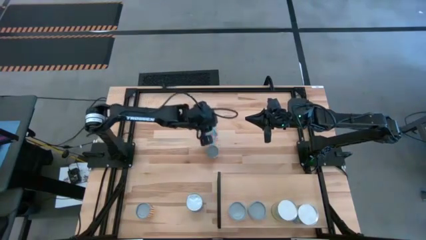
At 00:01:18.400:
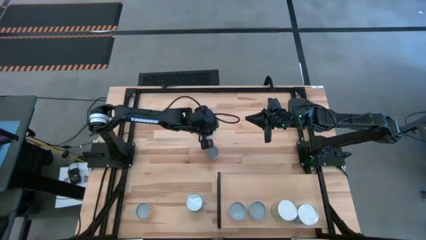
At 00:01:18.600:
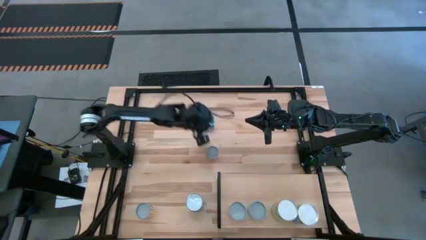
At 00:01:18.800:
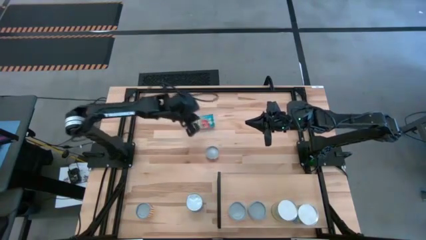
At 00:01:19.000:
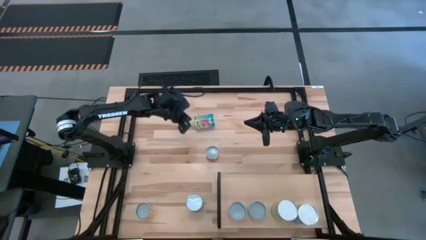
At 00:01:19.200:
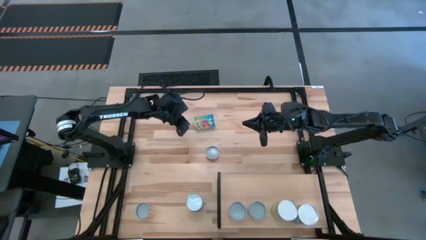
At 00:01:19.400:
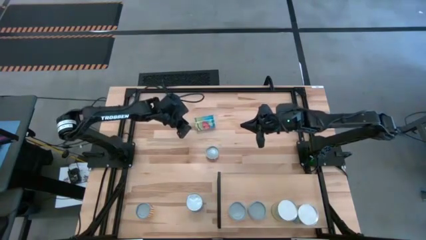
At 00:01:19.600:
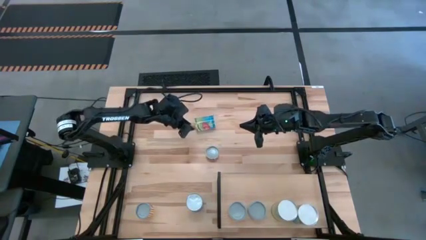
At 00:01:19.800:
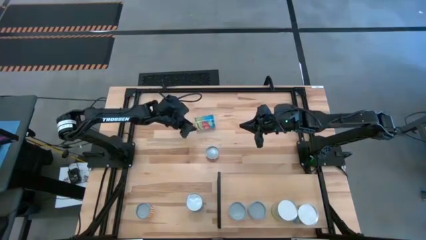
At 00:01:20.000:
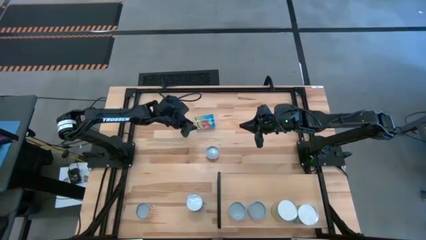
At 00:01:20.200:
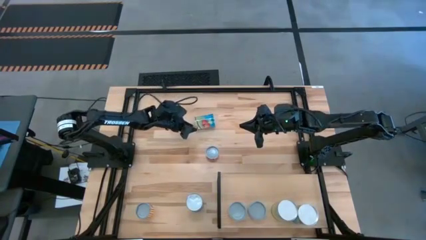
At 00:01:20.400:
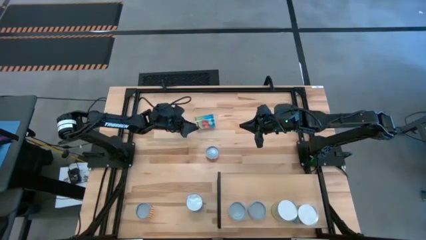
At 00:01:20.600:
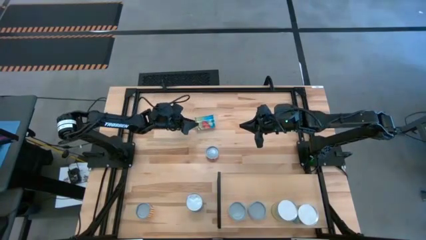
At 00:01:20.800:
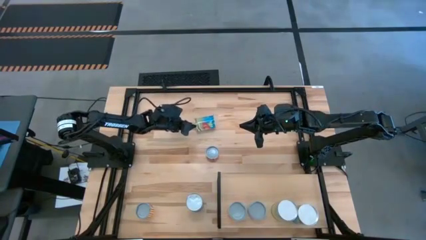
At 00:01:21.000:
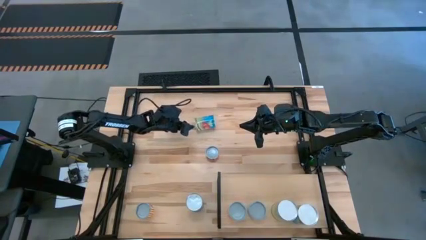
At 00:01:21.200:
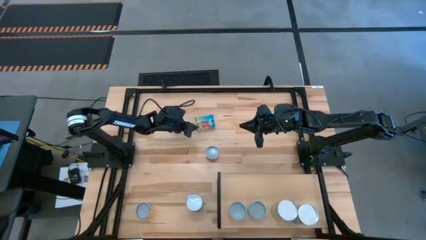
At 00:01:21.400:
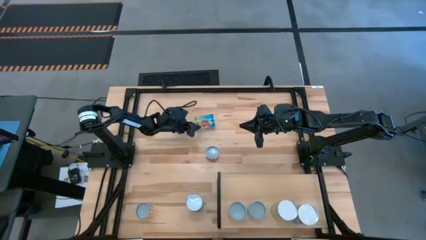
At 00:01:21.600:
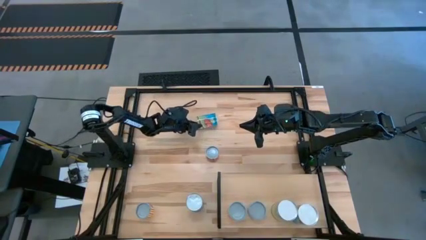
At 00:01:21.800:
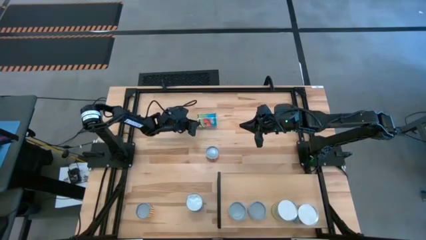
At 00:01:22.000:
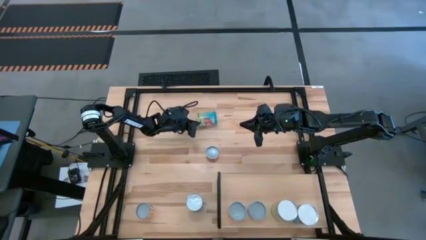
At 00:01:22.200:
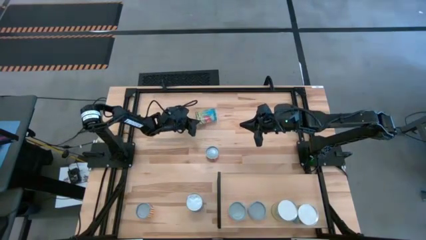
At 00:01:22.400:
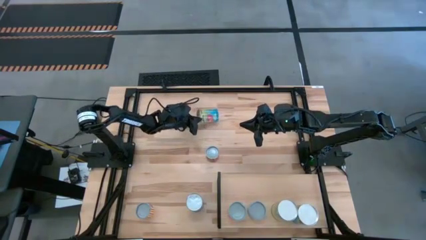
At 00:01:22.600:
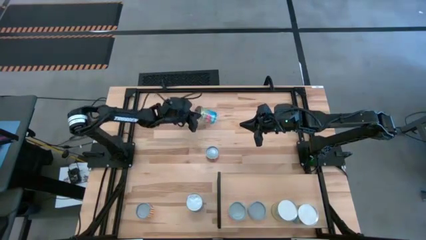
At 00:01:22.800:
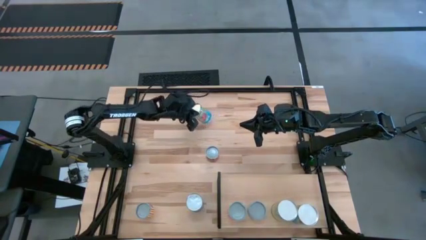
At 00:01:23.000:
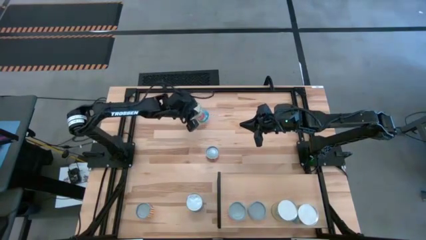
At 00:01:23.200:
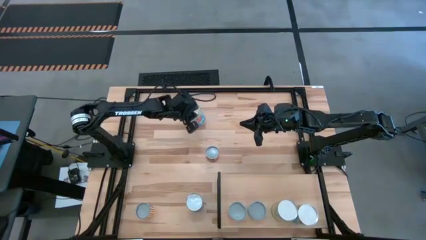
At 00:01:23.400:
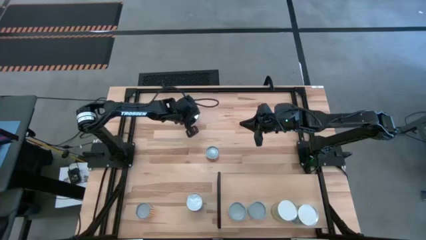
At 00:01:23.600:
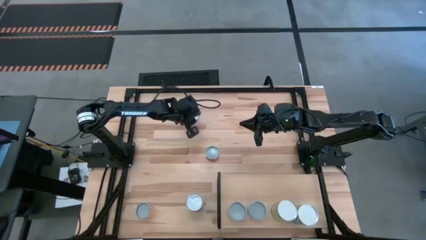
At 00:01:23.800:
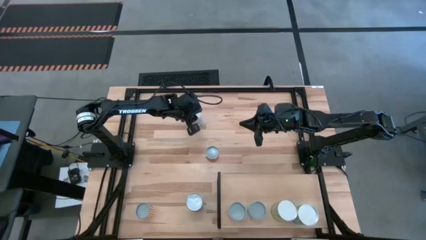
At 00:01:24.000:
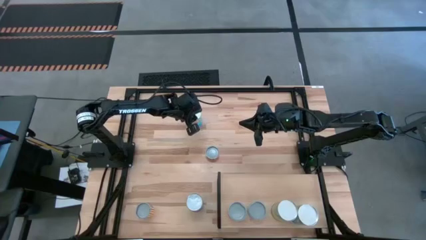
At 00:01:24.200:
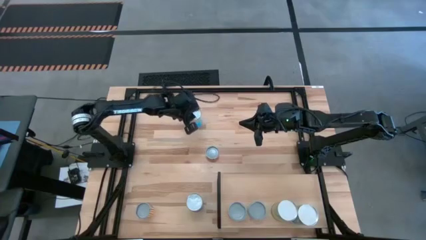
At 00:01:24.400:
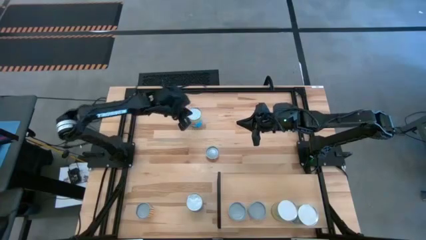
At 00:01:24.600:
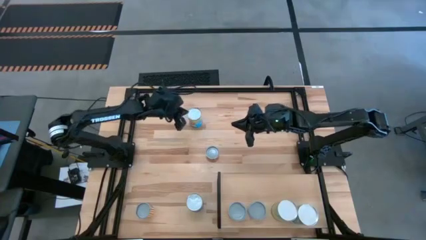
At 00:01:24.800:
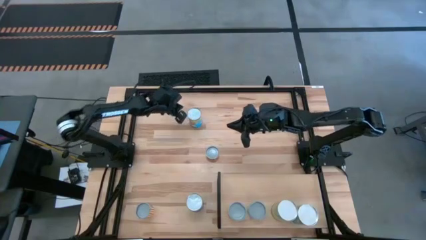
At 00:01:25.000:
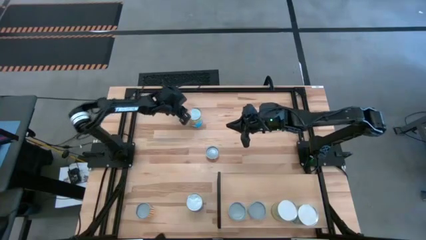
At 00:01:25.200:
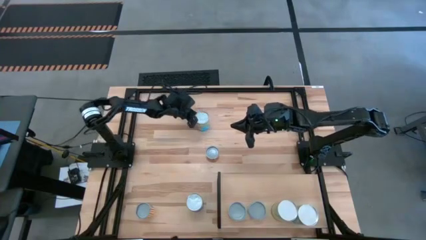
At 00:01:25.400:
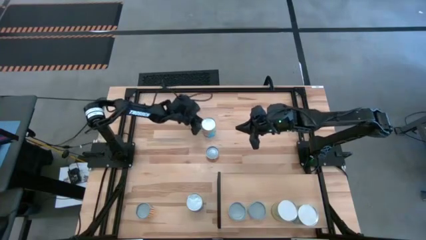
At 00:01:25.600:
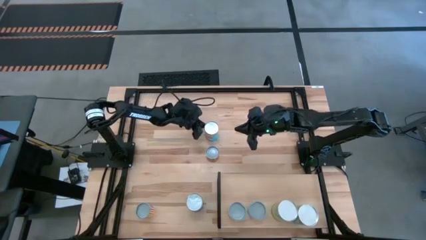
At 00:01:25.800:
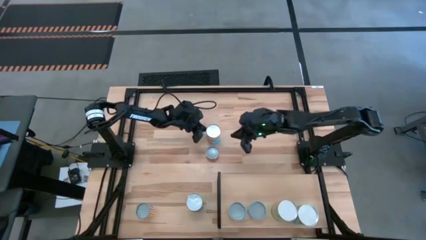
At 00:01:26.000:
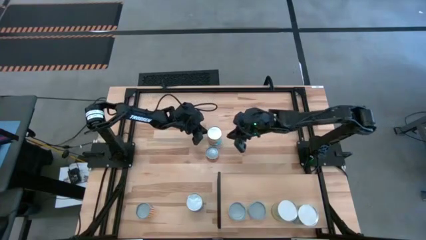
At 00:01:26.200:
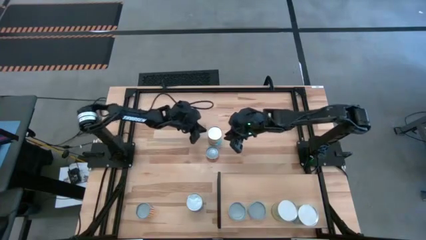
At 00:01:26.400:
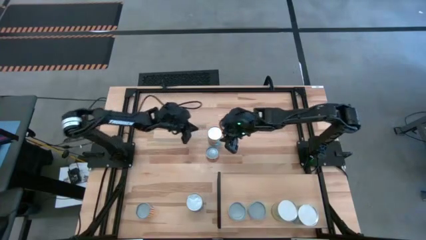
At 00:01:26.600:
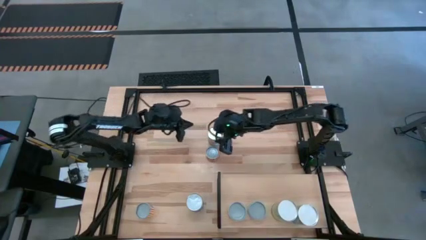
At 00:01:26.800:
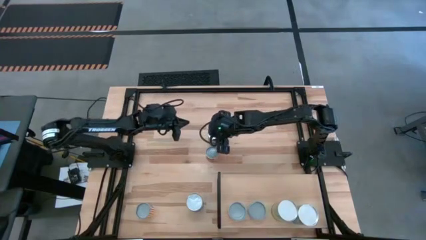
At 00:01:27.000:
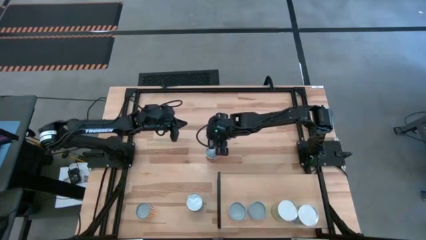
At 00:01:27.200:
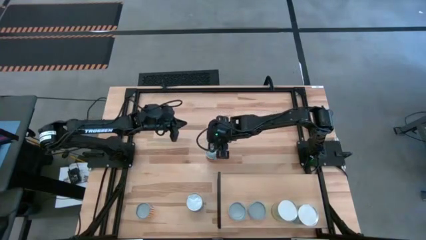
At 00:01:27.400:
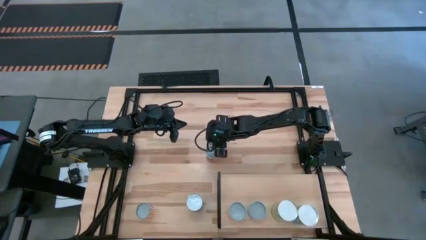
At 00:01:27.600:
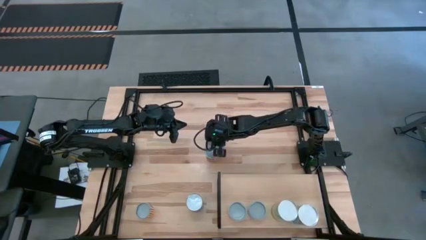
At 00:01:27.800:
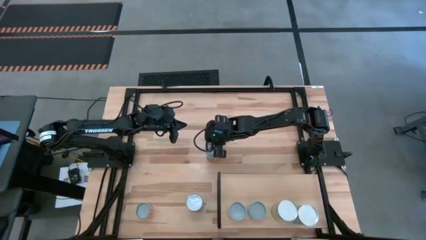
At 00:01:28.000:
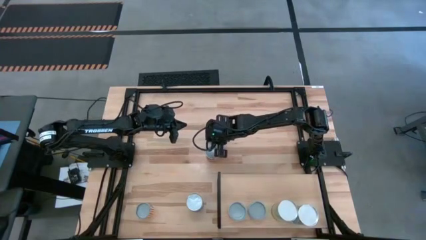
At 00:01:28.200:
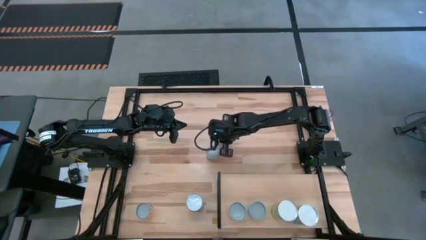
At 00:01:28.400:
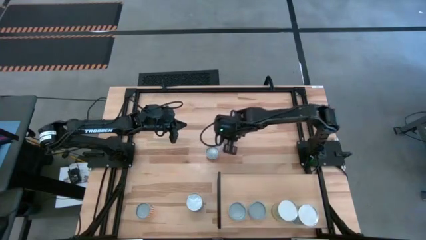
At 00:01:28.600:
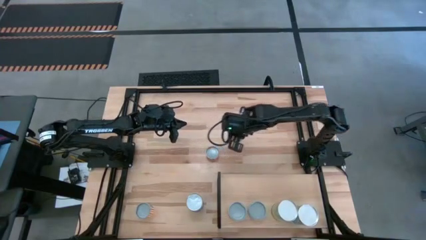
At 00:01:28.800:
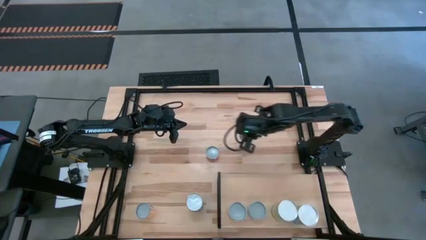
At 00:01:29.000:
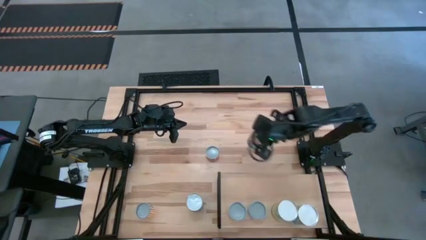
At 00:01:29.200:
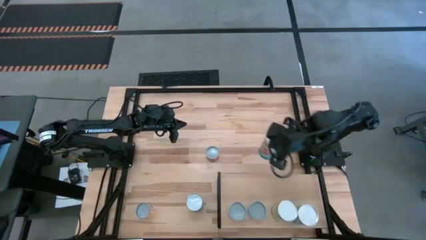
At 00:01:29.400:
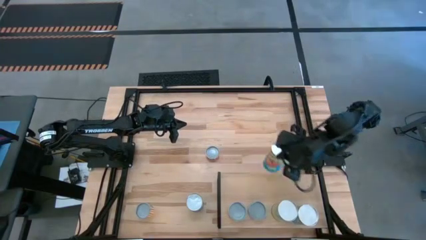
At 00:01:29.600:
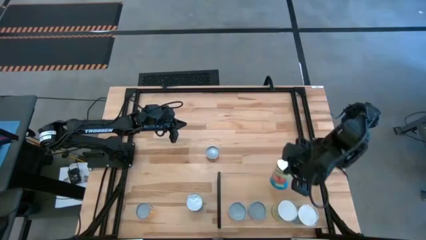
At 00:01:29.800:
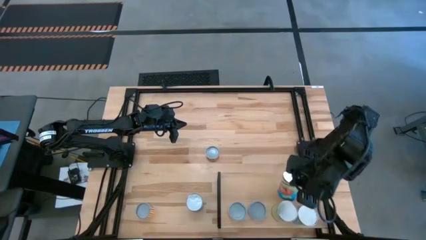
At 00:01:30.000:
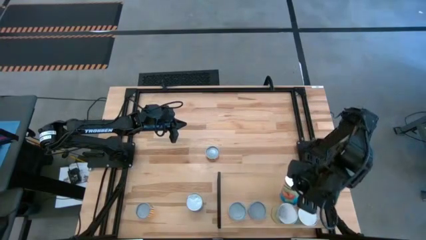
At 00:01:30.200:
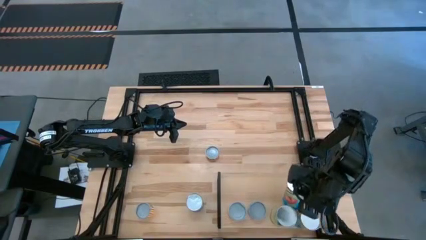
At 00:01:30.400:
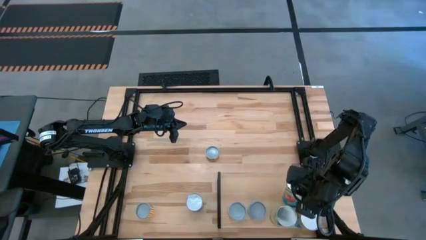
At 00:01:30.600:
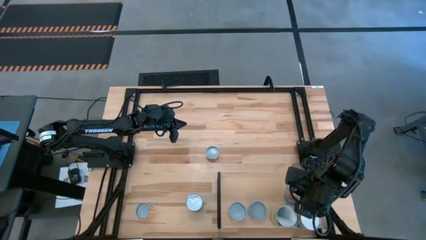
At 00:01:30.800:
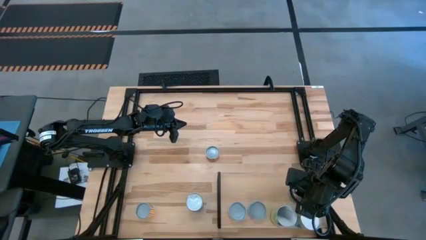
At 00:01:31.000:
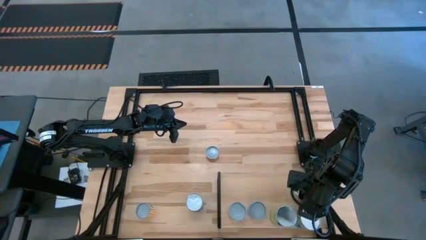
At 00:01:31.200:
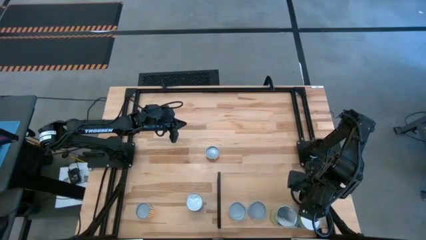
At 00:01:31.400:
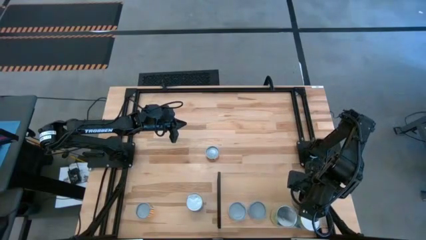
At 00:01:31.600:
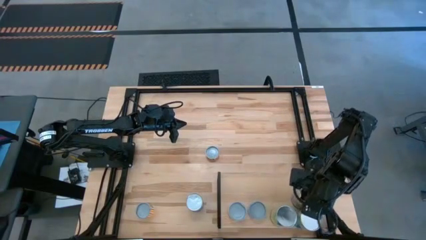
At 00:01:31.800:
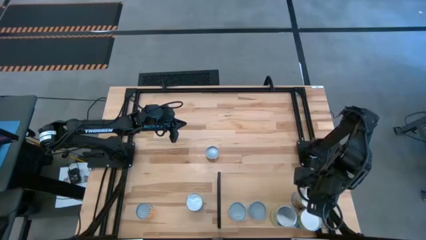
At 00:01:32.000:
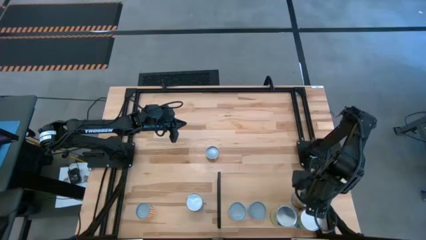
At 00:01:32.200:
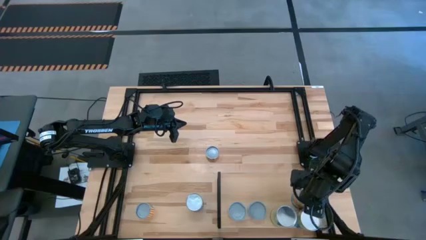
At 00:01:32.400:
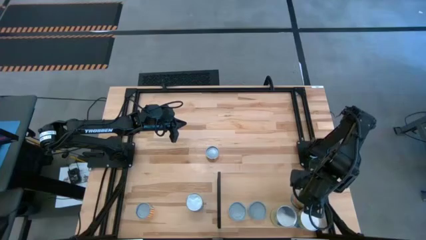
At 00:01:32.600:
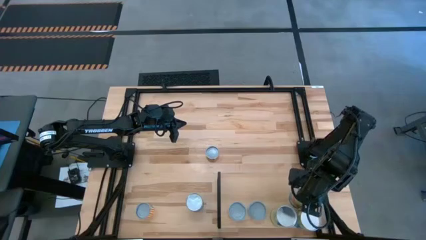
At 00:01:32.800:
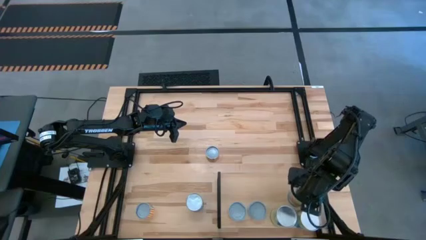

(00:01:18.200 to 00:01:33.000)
Task: Pick and place cans onto a shelf
Put the canned tomatoes on the shelf

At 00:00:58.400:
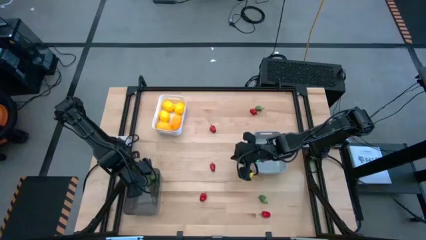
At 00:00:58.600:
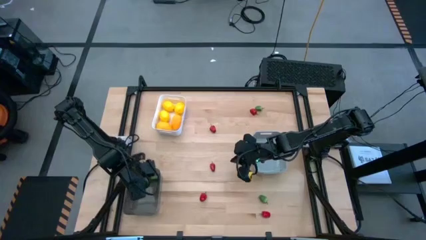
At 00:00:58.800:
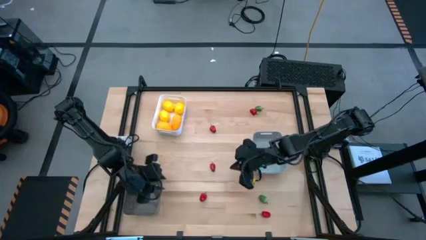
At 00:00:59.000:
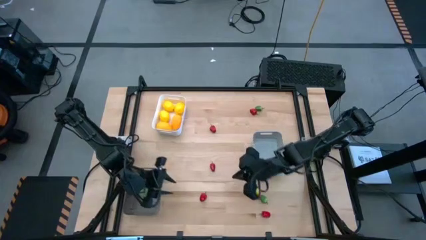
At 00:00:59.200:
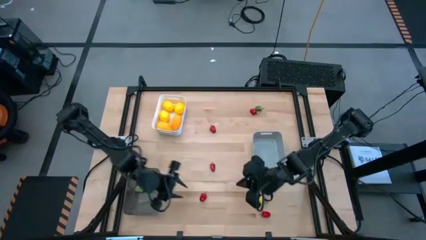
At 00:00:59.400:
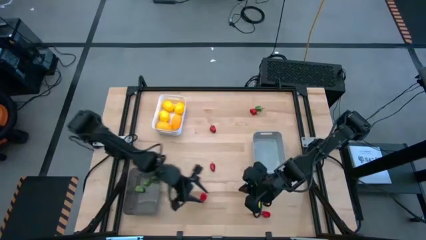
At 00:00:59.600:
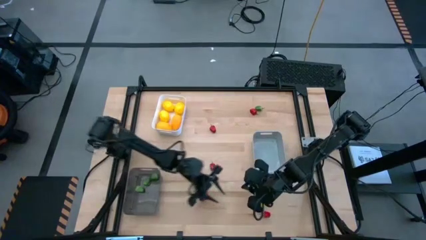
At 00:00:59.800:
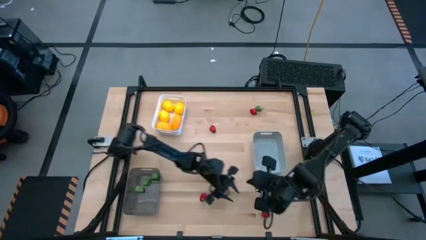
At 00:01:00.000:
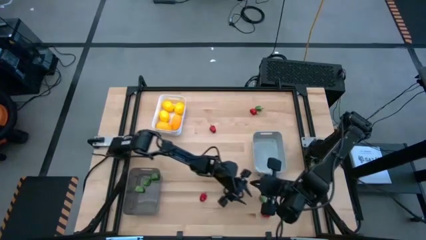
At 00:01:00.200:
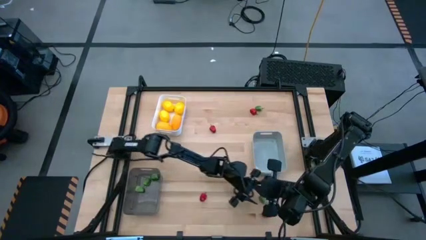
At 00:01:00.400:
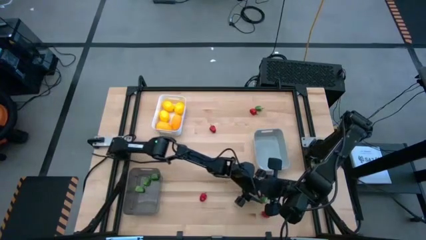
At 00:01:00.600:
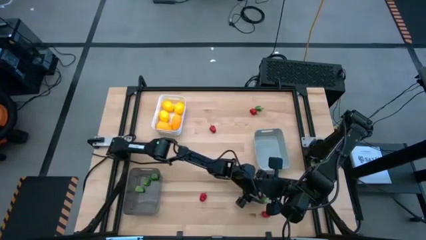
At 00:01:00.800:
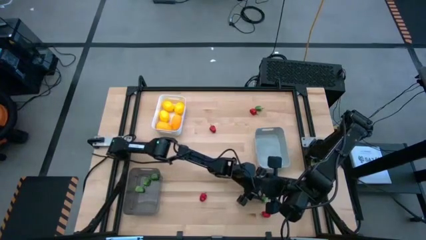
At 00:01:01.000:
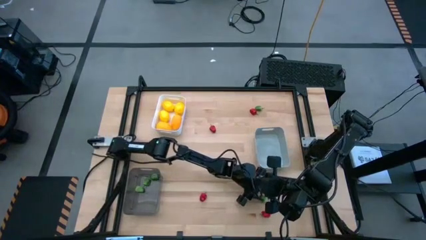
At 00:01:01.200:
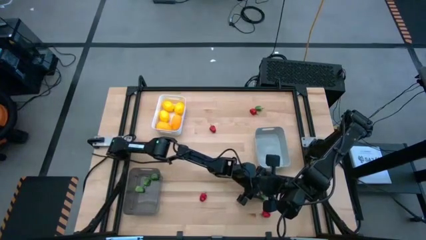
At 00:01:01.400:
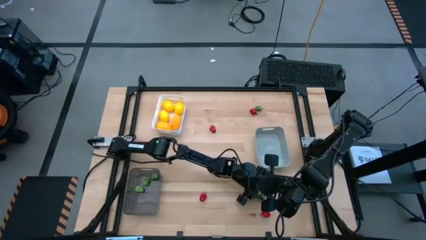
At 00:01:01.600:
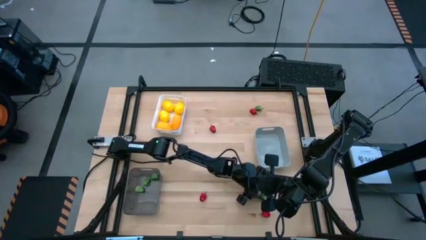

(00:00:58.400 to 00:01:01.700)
Task: Sort produce into baskets
Put the bottom green chili pepper into the transparent black bin
